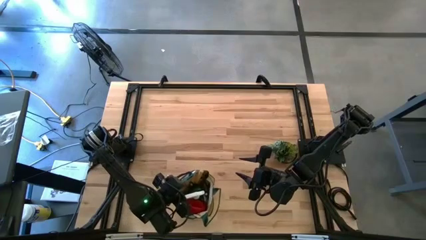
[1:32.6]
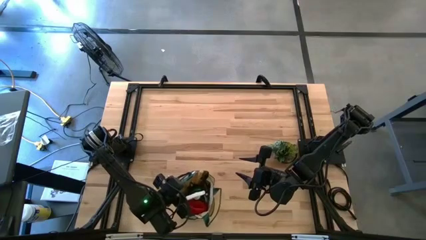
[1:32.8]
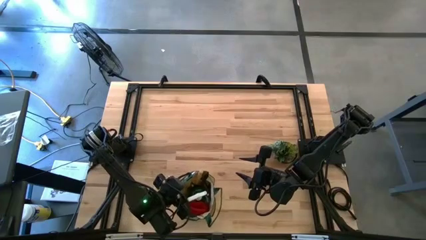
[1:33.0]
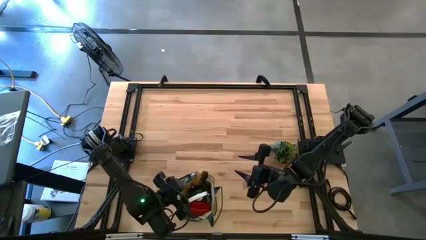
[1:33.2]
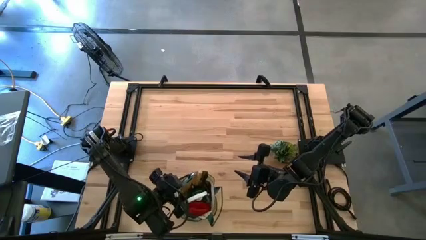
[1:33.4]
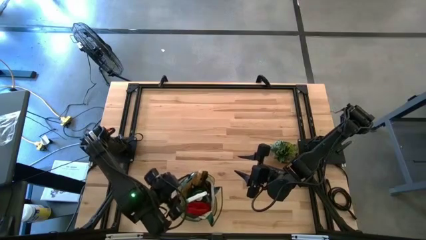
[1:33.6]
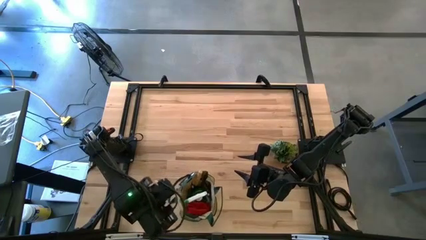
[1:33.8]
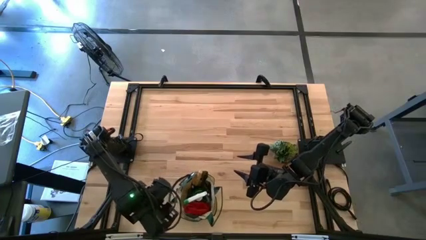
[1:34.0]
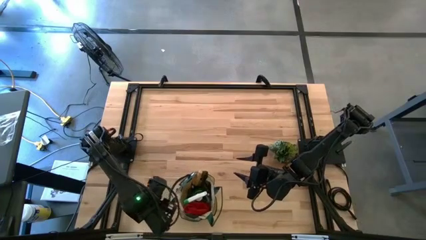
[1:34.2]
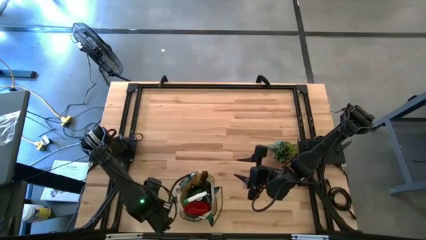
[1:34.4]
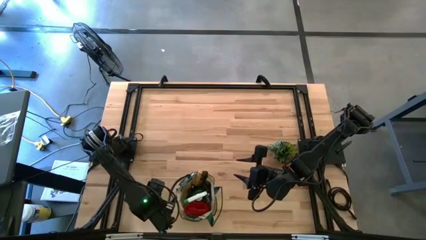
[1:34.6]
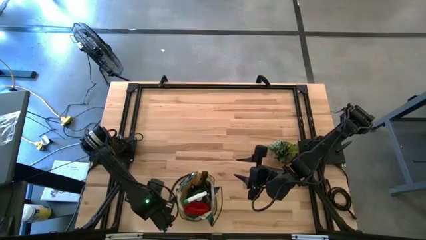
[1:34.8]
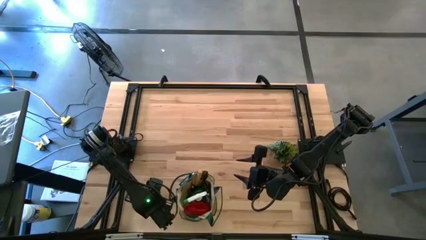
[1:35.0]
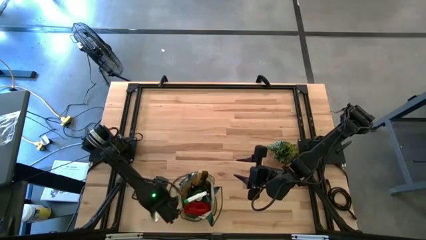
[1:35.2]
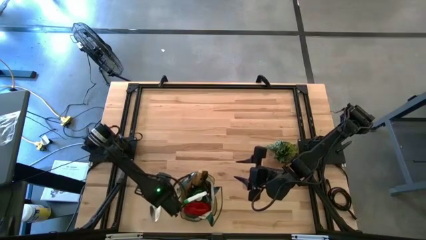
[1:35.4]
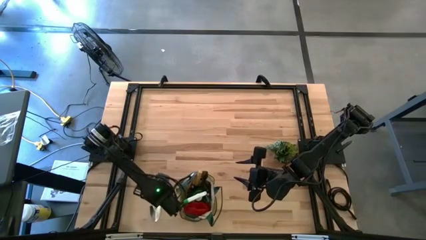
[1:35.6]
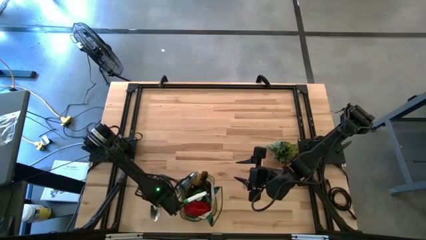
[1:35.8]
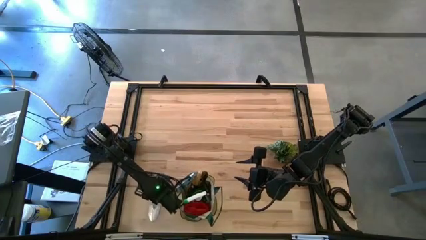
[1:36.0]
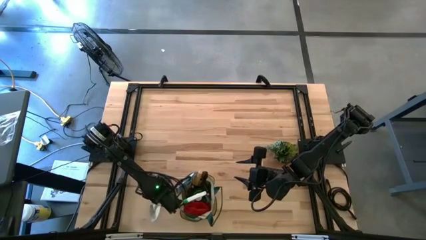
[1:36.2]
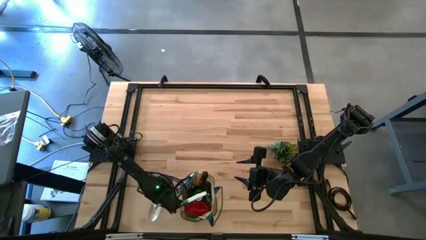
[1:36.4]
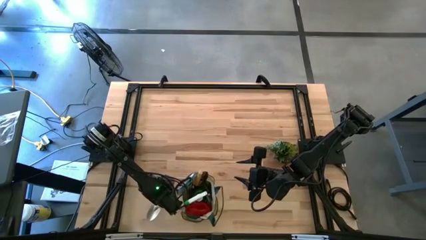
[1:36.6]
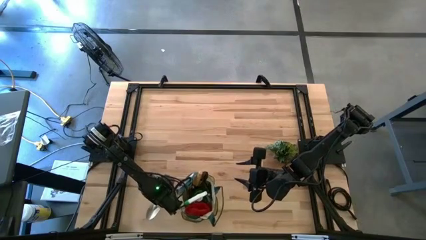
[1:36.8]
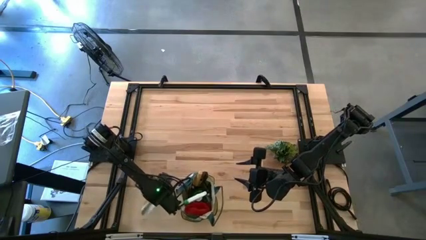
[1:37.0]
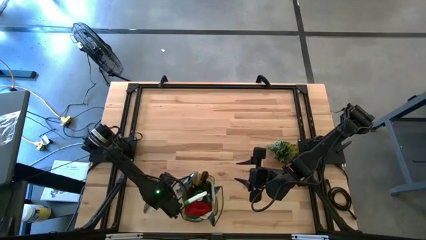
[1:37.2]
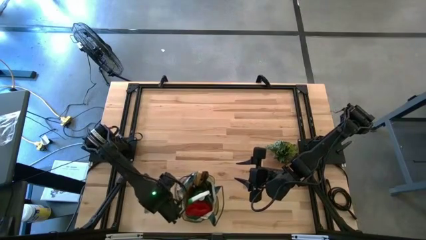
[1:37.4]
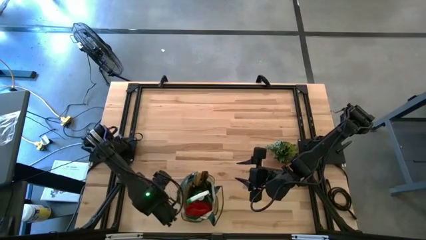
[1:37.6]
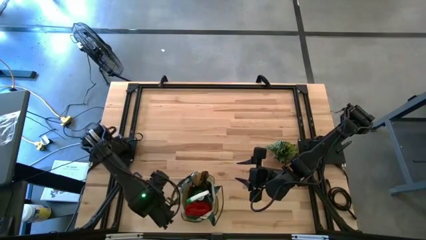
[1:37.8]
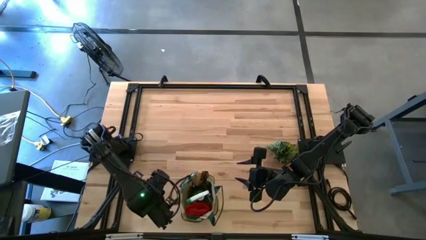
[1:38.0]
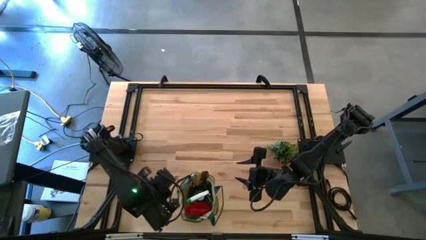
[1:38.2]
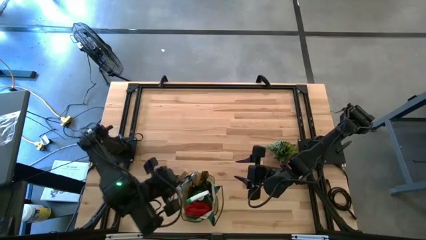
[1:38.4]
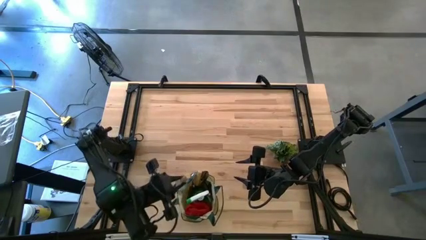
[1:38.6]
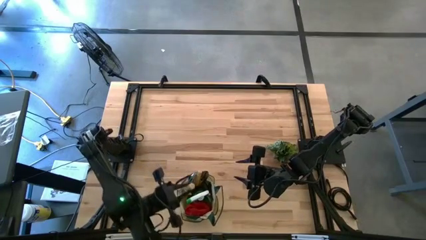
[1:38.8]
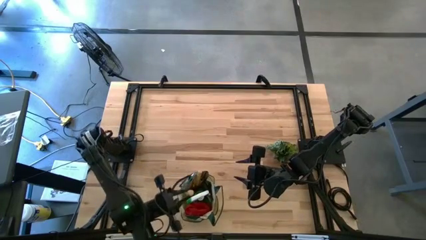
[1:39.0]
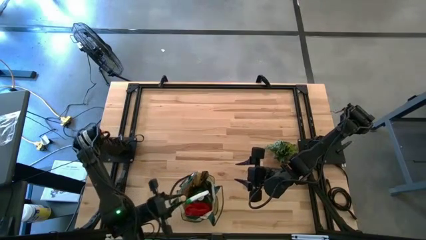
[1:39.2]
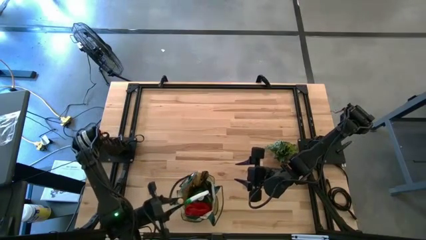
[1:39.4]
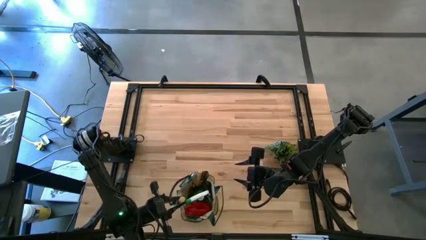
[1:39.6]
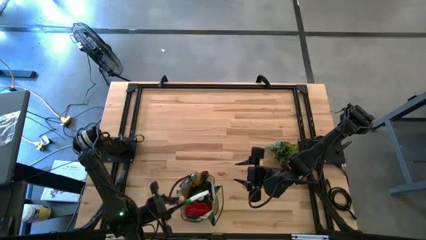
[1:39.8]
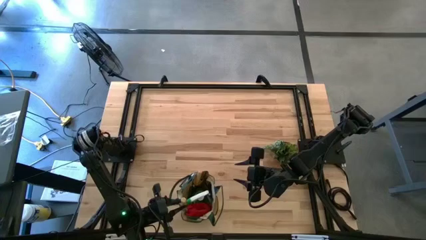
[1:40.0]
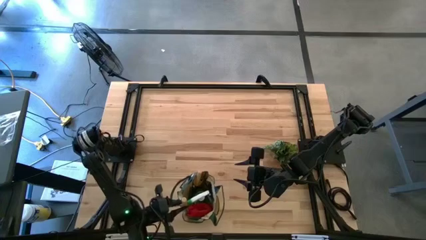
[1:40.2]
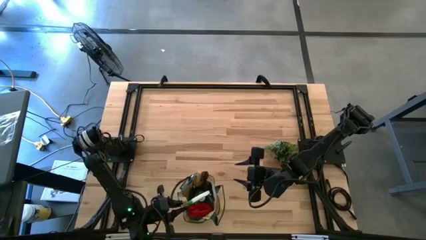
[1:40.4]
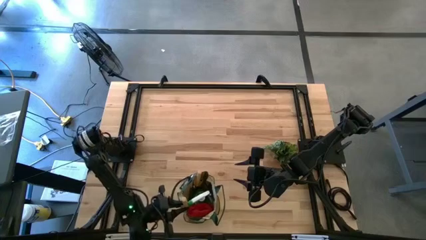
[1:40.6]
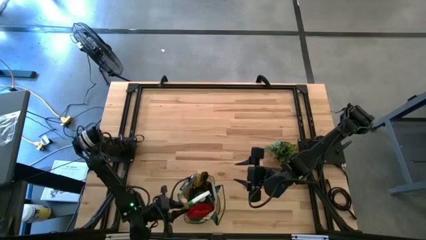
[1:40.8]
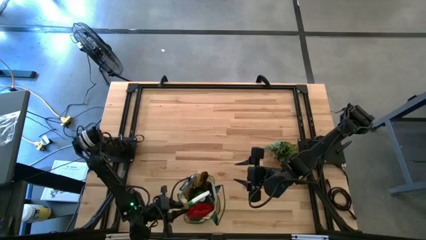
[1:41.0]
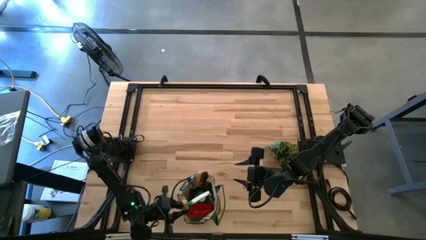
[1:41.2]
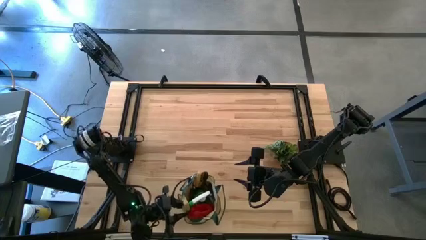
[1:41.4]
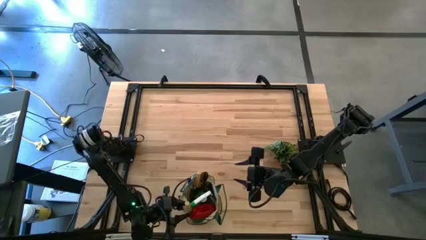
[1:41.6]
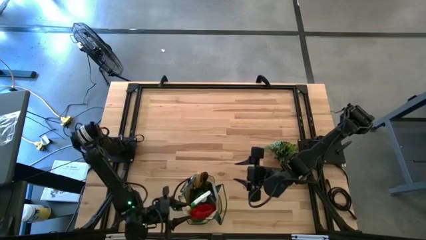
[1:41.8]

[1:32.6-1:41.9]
Task: Pick & Place Garden tools in Gardening bag
Put the brown trowel into the brown gardening bag

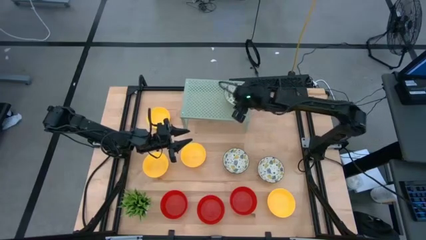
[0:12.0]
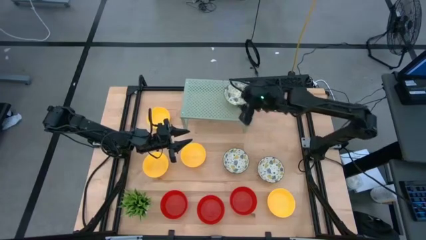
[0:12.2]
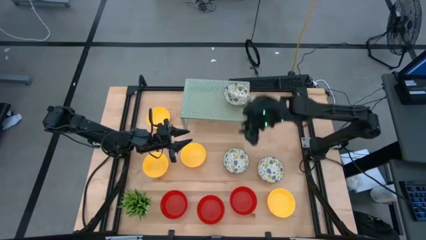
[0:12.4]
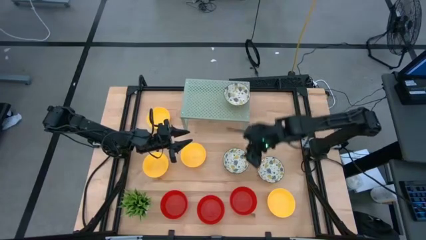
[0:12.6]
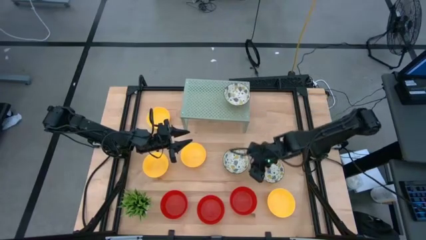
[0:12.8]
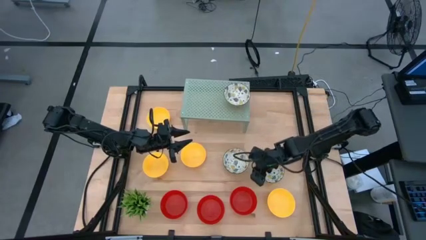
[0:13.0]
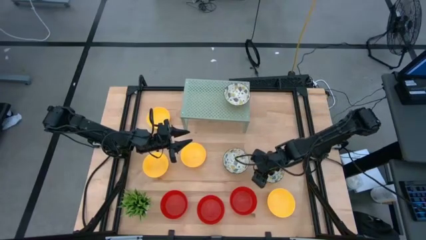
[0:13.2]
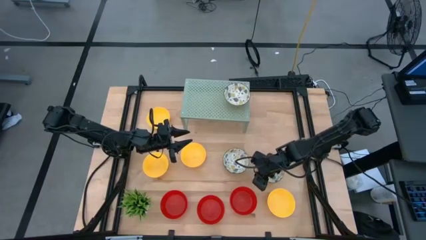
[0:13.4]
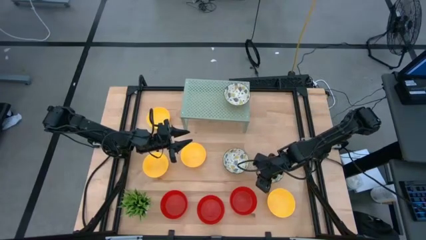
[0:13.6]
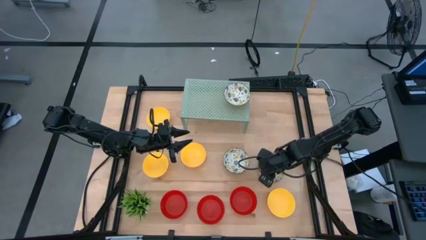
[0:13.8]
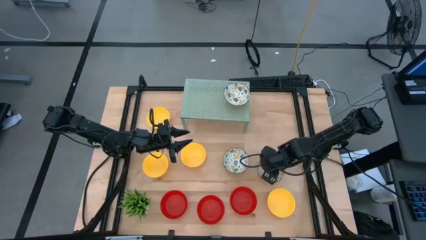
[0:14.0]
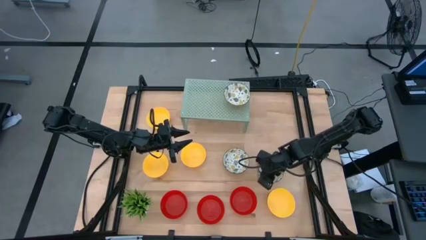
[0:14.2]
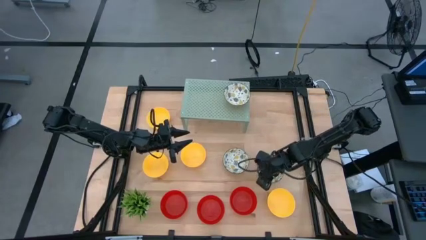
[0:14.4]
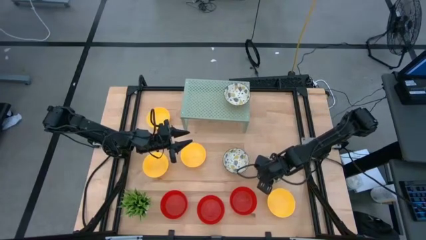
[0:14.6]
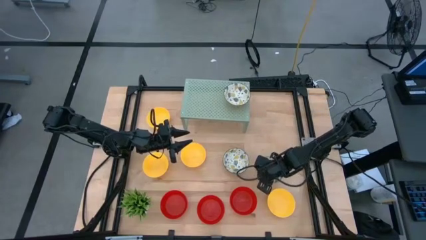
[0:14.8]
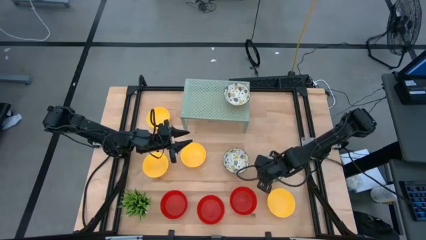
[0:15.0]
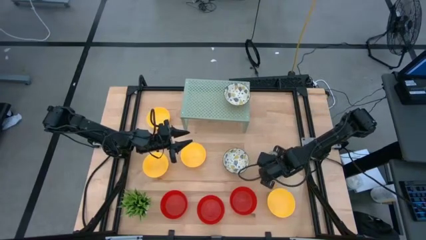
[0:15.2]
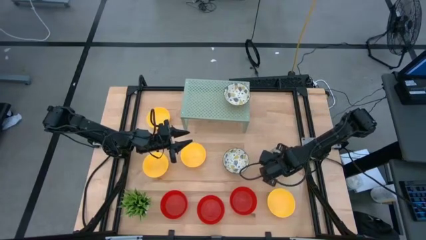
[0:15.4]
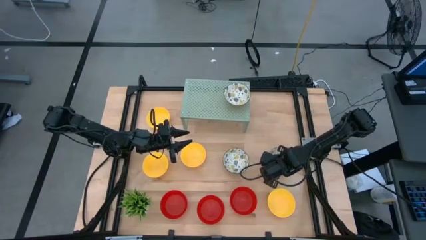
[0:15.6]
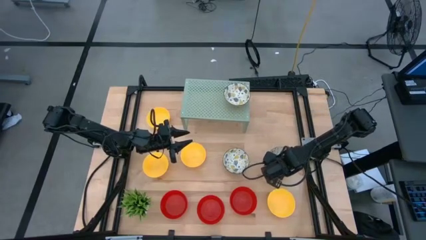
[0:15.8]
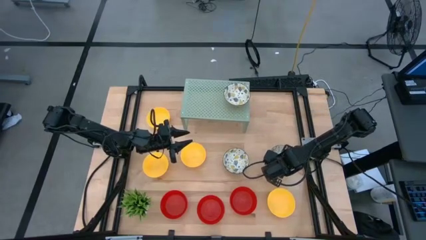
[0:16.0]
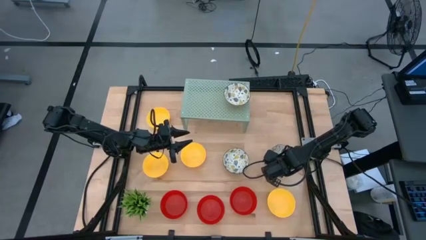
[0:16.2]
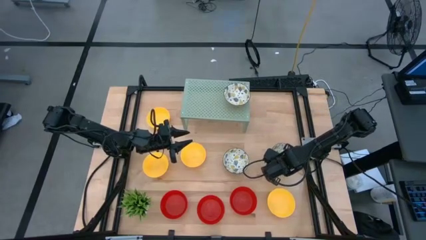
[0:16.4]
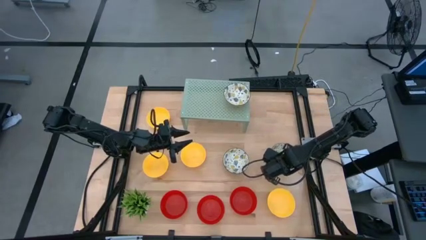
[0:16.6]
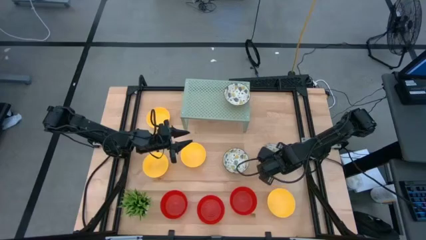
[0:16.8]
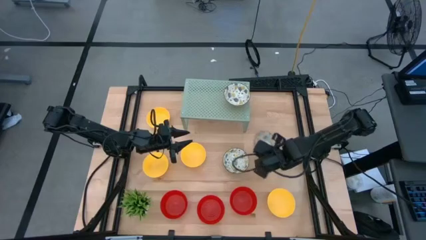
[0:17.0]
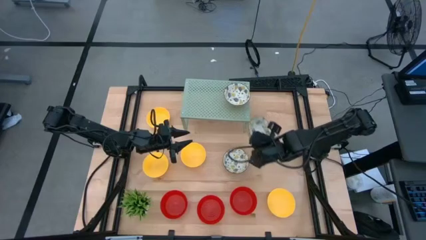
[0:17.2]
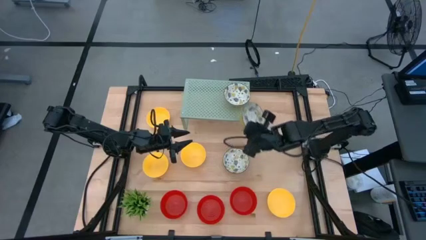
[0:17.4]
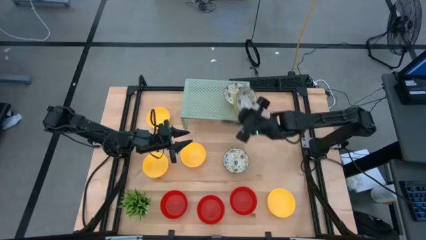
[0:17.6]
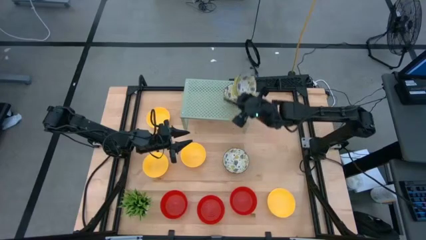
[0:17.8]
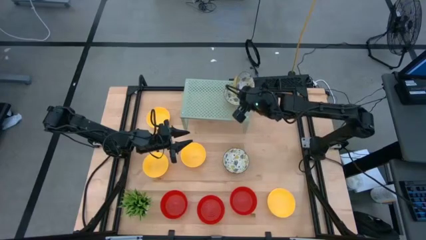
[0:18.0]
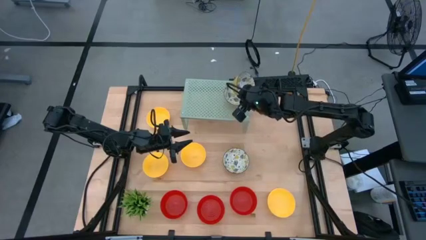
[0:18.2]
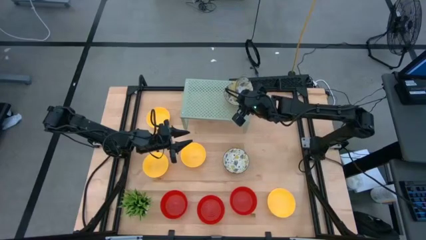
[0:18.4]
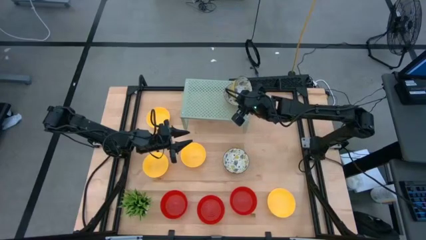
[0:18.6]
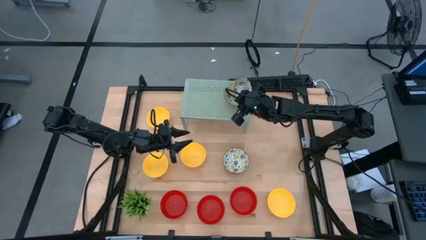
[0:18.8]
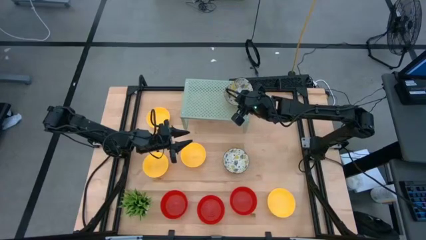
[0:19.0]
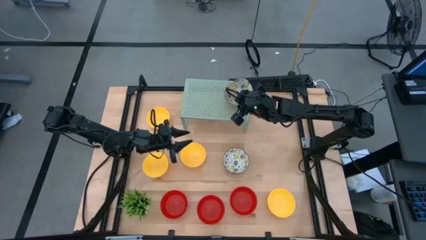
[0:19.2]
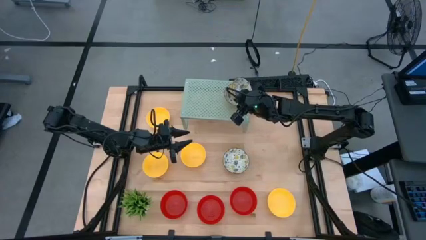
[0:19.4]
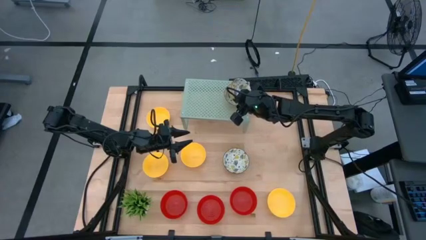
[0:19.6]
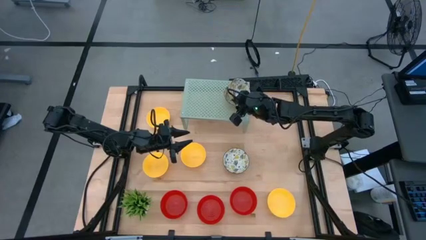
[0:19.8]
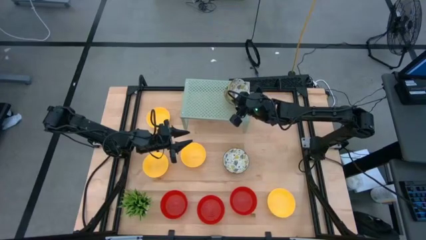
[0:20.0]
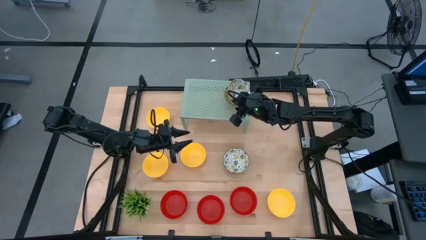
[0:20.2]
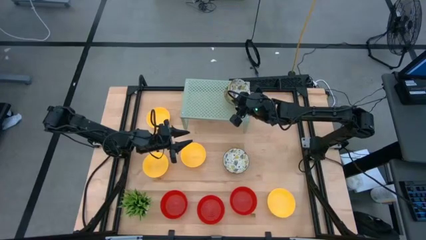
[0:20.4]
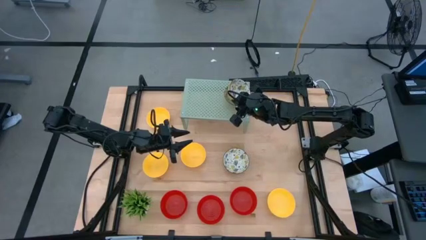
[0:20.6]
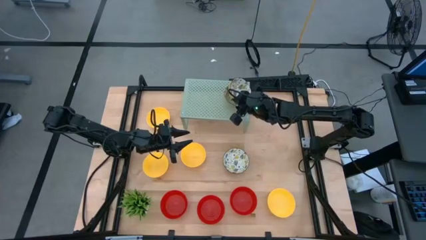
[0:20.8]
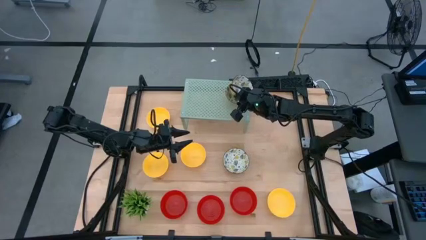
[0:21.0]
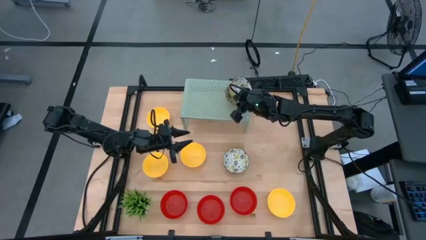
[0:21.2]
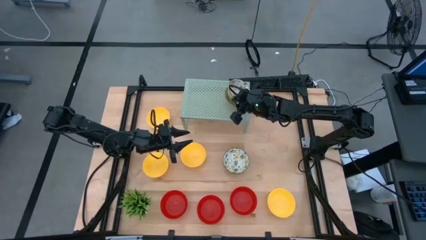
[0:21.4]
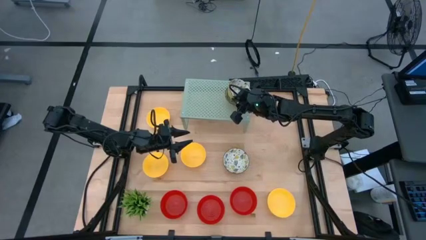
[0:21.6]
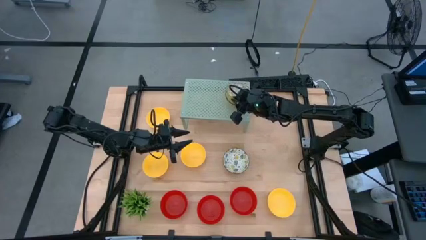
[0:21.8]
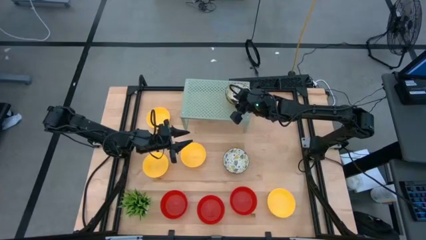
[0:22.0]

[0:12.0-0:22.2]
Task: Pick & Place Mini bowls
Stack the white patterned bowl on the white patterned bowl on the shelf
